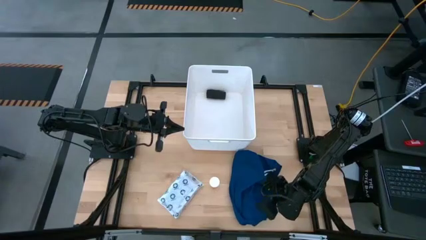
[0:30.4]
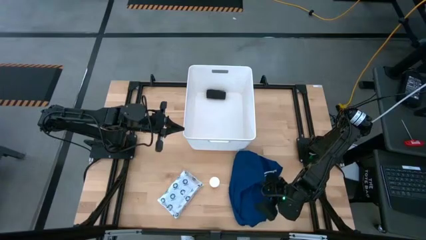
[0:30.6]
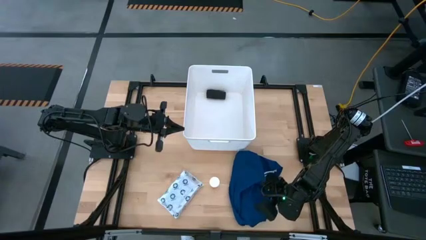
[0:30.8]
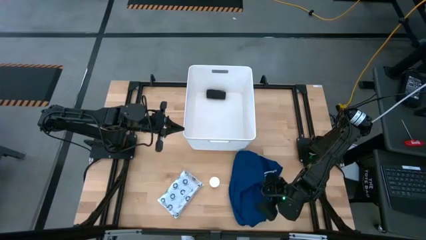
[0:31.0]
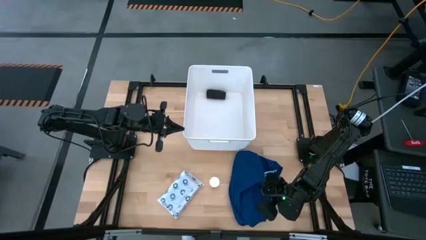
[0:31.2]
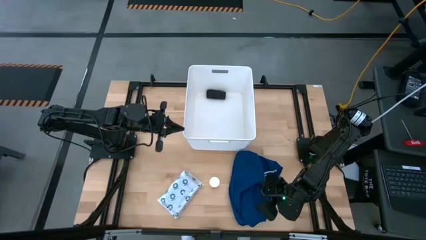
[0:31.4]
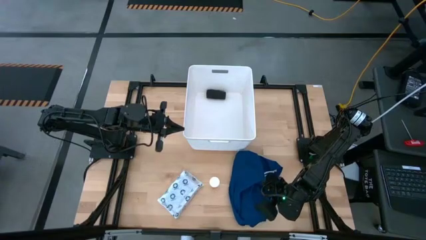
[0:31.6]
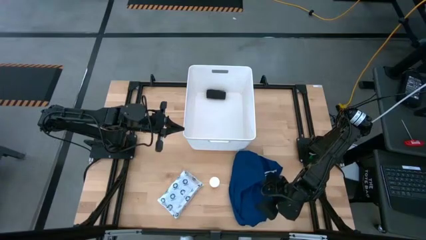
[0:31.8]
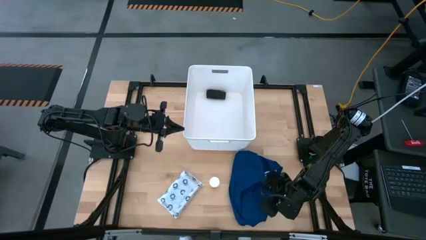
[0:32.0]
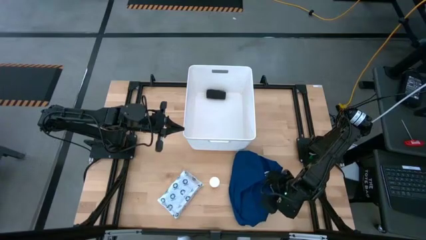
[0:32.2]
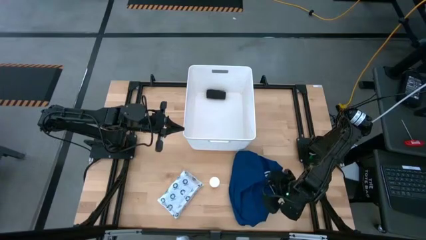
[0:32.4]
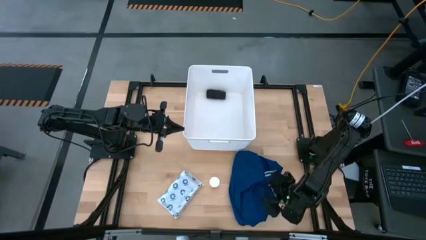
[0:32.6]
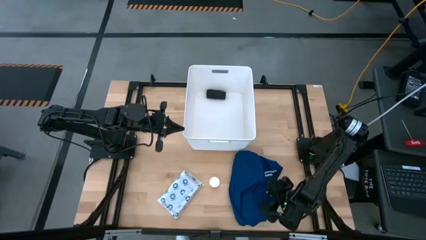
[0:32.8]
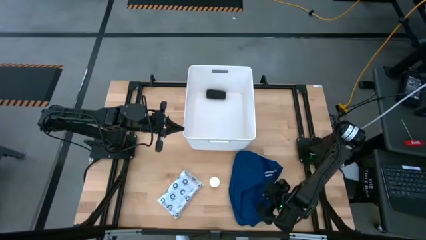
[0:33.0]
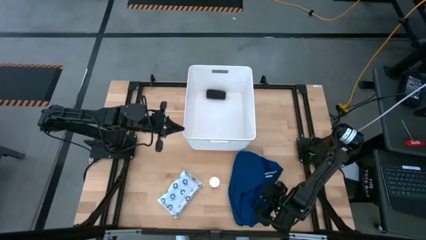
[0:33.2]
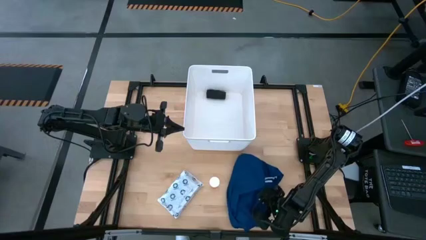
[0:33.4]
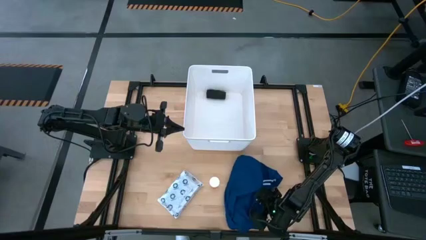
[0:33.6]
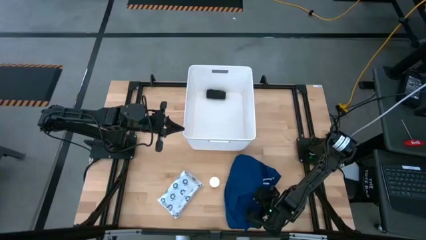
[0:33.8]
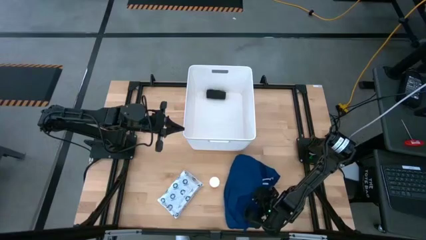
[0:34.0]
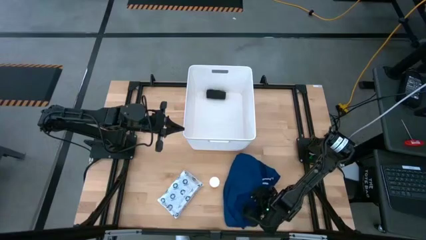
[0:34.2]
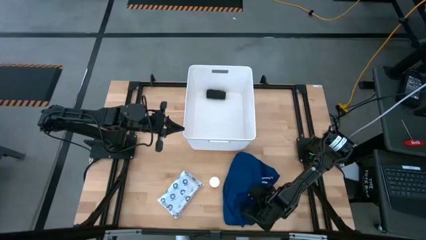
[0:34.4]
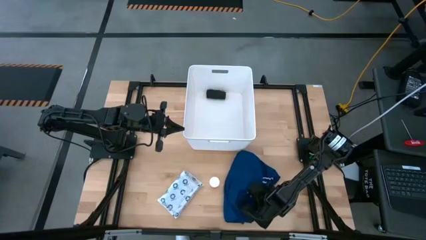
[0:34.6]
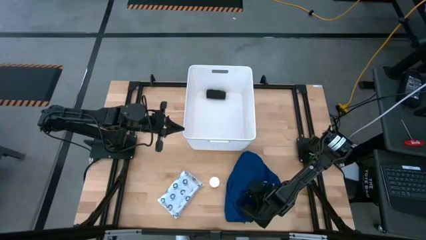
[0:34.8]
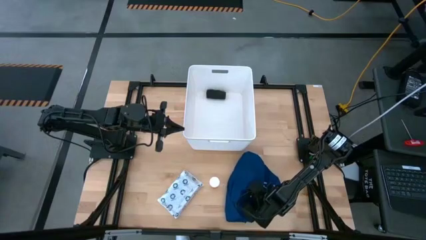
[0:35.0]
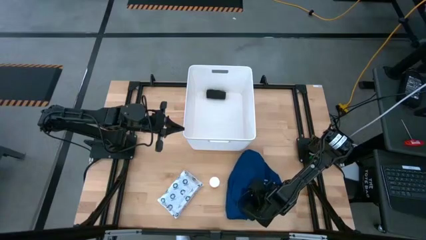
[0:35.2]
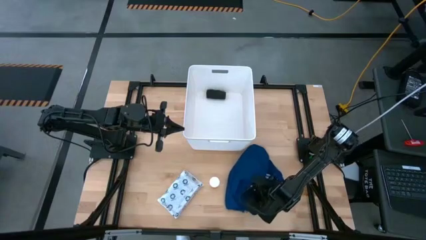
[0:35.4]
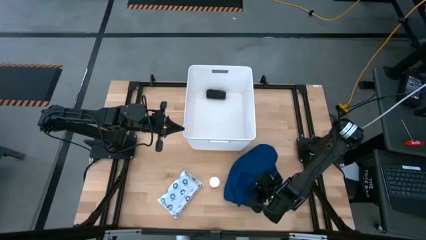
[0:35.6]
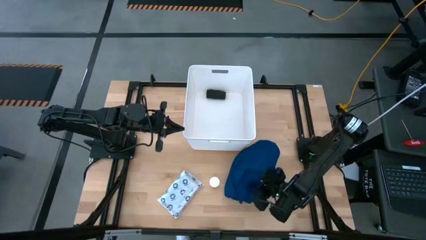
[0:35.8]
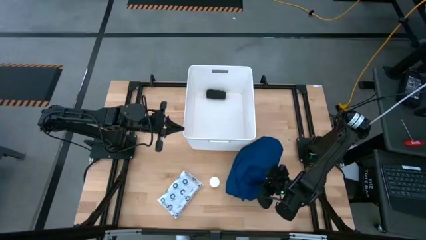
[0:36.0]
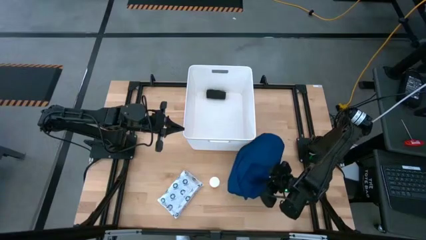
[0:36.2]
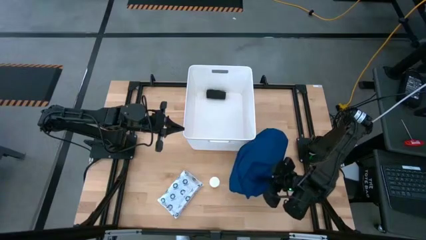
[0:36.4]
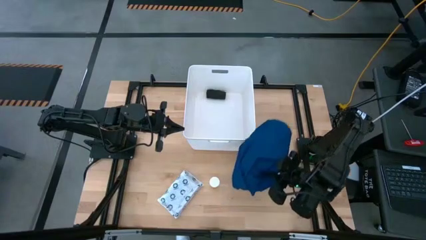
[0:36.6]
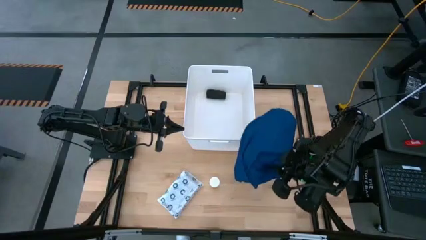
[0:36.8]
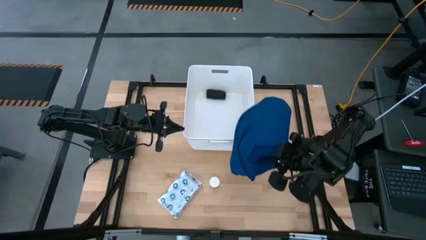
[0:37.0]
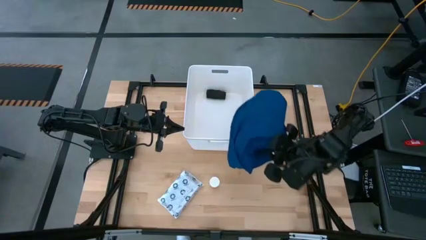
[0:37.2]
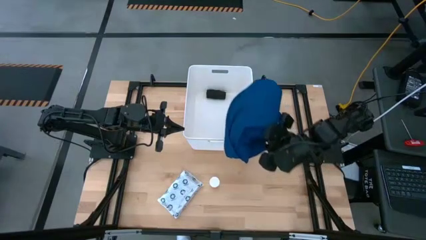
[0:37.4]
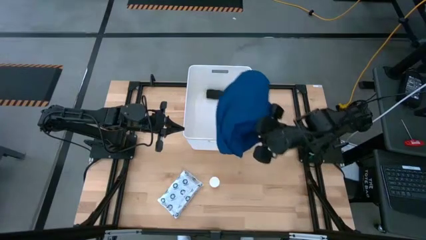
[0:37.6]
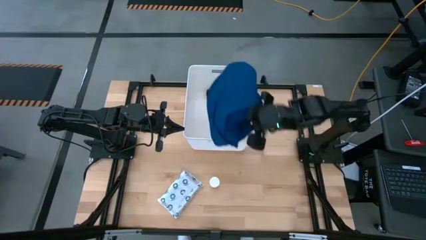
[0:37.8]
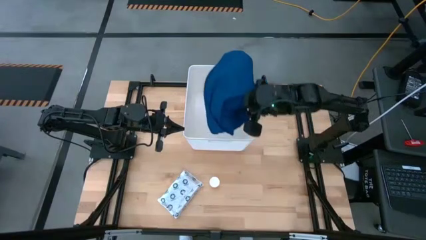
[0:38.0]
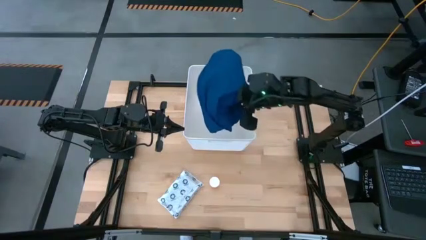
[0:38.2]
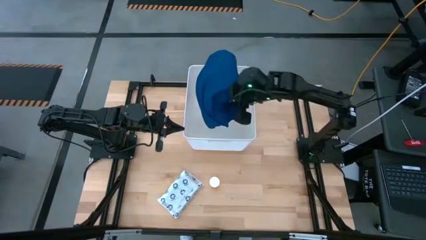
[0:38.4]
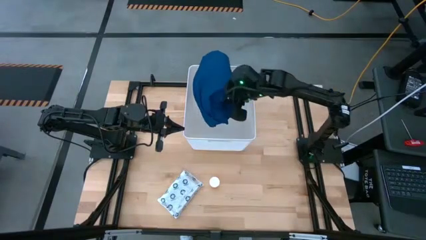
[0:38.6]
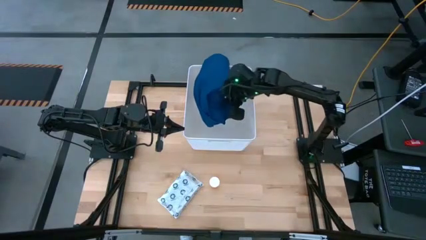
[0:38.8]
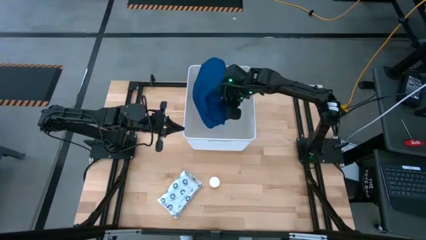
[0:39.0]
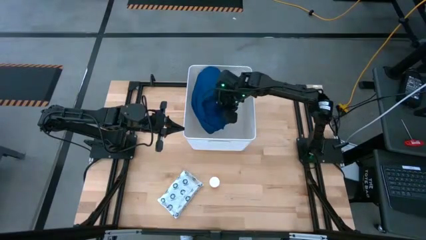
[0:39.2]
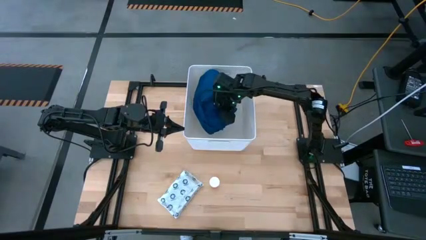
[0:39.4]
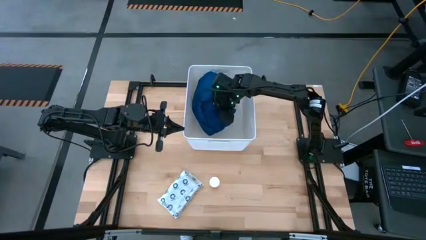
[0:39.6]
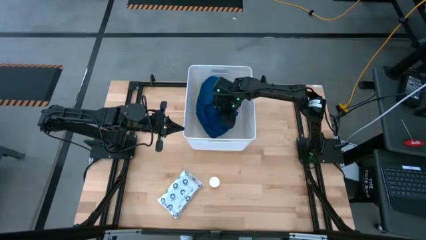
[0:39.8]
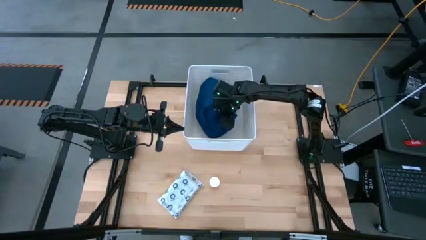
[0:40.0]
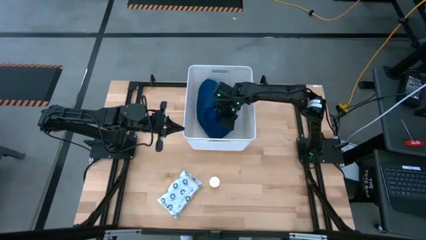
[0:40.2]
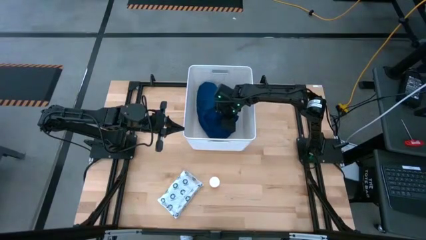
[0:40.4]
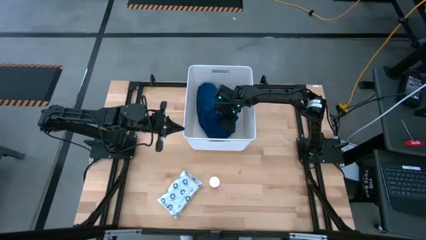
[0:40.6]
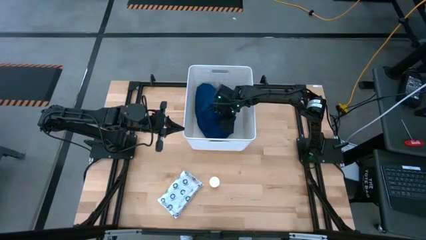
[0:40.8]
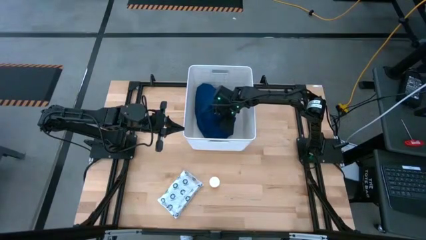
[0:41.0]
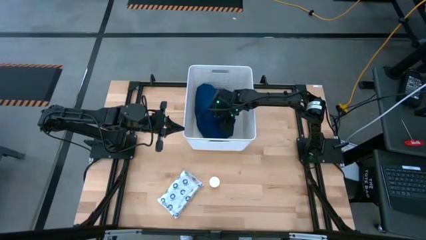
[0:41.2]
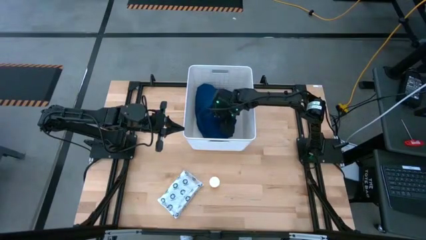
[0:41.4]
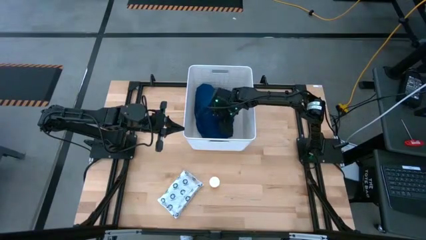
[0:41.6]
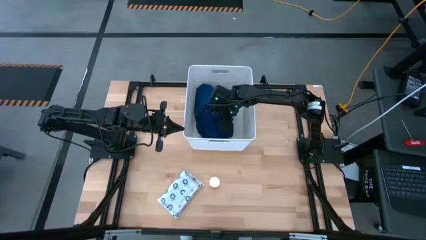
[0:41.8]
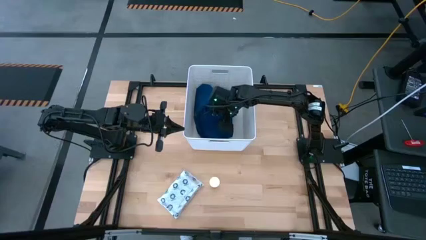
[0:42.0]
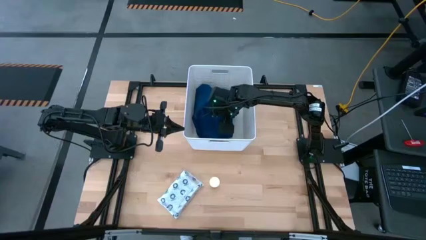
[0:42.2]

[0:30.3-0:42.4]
Task: Pick & place medical supplies in basket/bin
Put the blue patient gown into the white bin

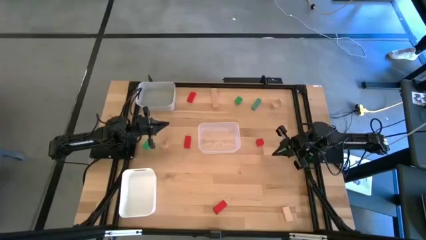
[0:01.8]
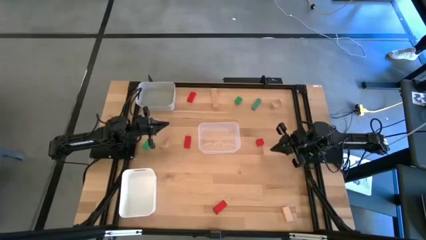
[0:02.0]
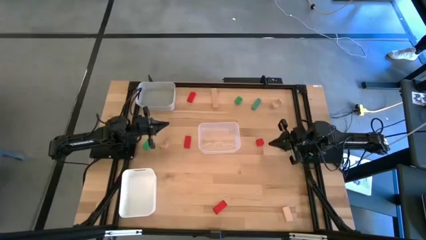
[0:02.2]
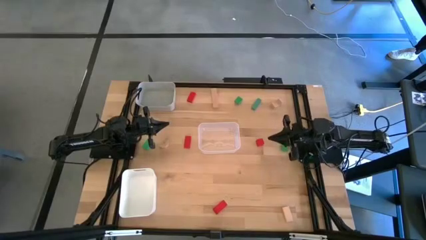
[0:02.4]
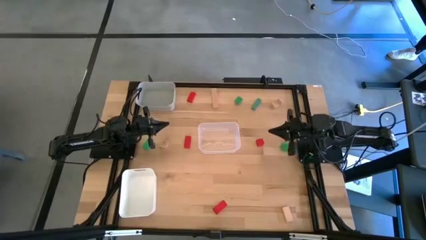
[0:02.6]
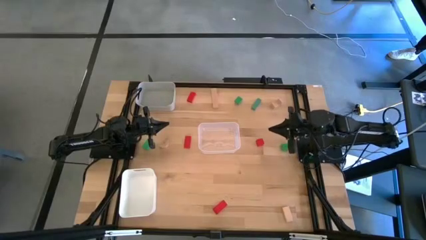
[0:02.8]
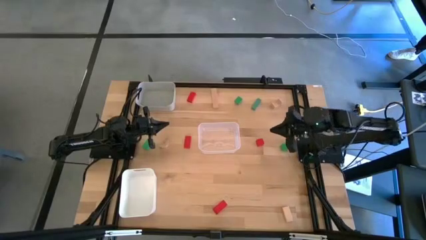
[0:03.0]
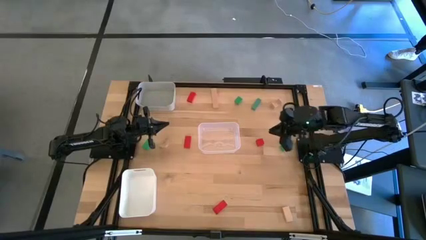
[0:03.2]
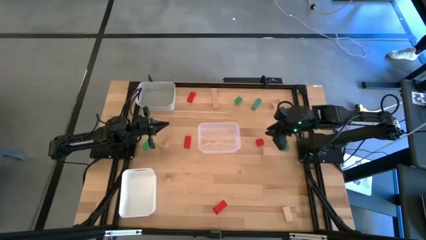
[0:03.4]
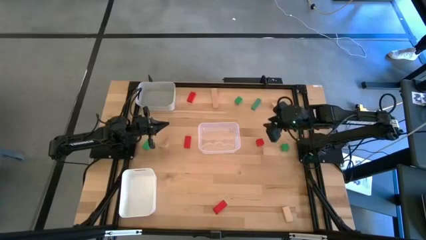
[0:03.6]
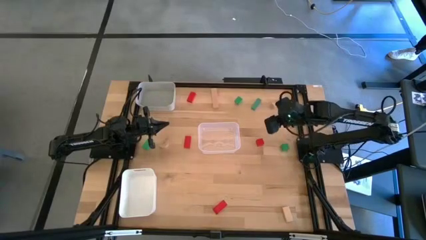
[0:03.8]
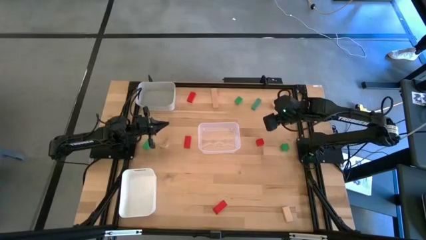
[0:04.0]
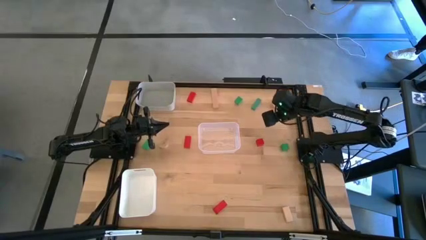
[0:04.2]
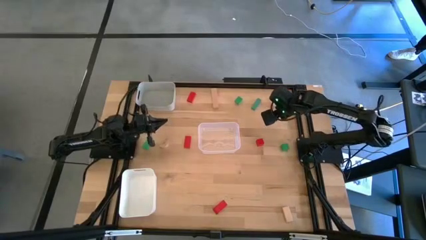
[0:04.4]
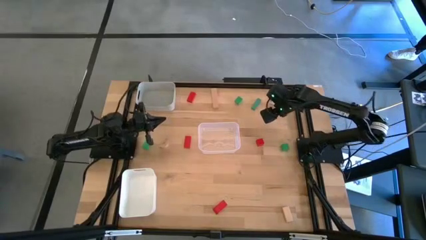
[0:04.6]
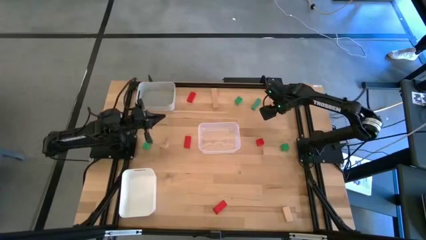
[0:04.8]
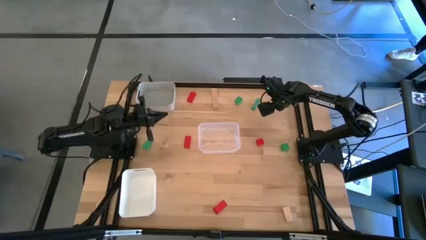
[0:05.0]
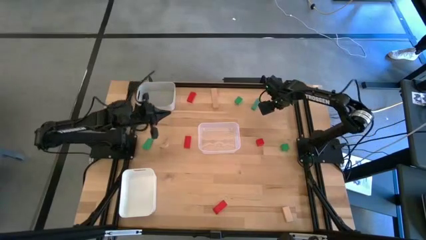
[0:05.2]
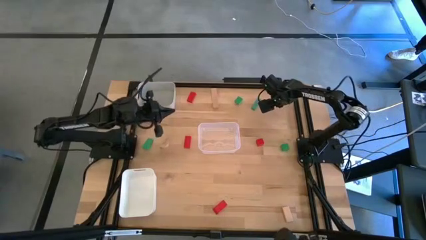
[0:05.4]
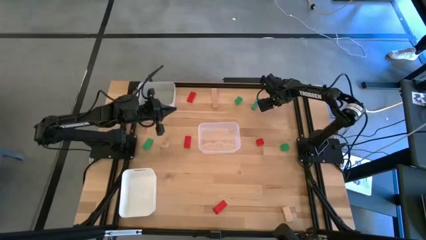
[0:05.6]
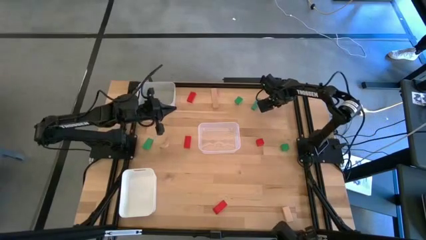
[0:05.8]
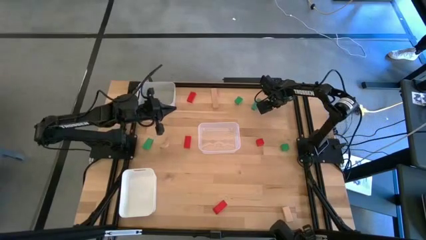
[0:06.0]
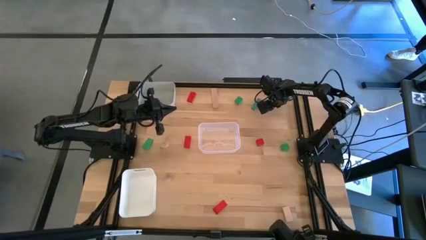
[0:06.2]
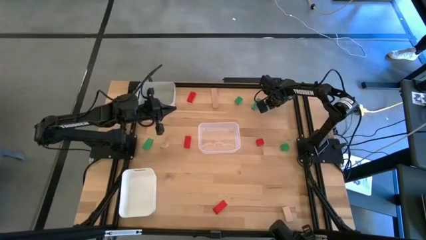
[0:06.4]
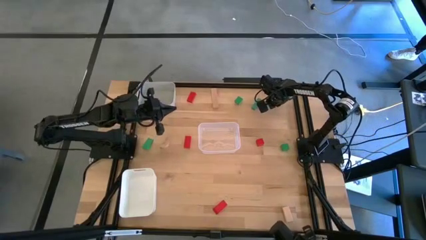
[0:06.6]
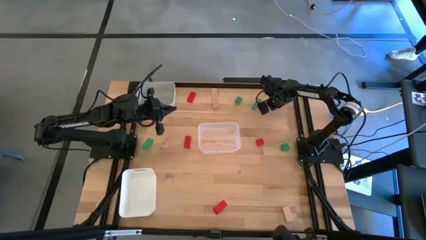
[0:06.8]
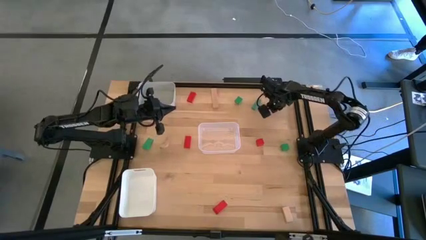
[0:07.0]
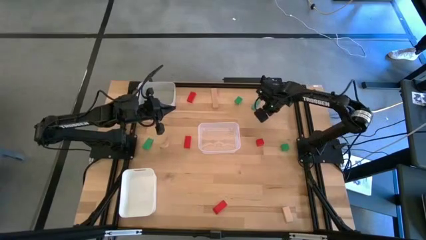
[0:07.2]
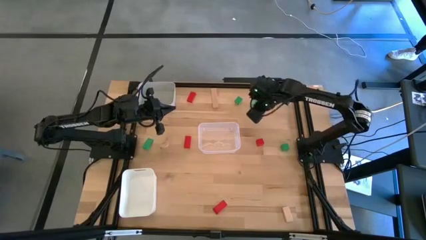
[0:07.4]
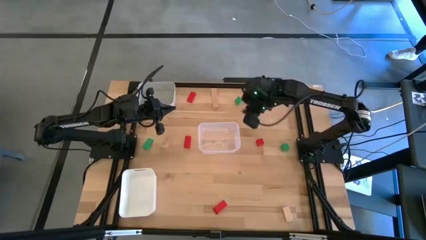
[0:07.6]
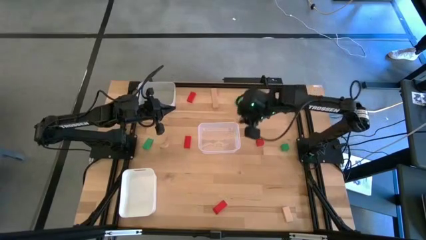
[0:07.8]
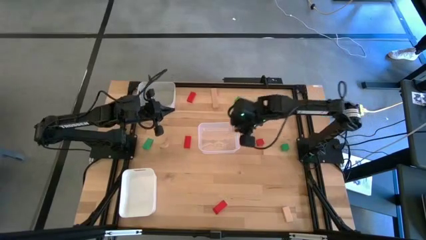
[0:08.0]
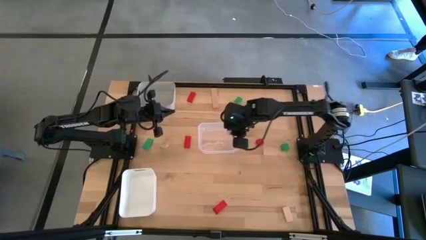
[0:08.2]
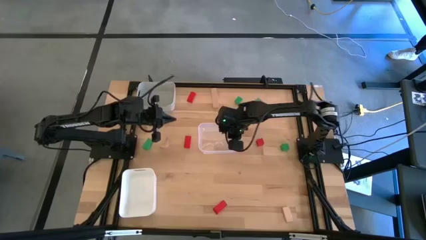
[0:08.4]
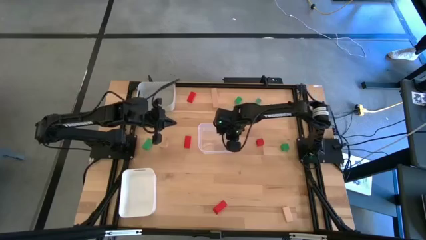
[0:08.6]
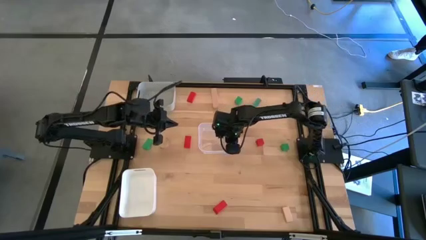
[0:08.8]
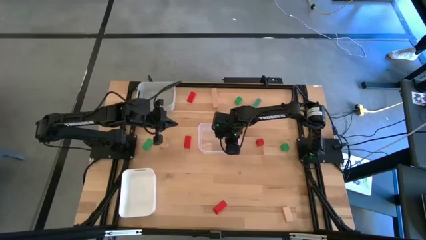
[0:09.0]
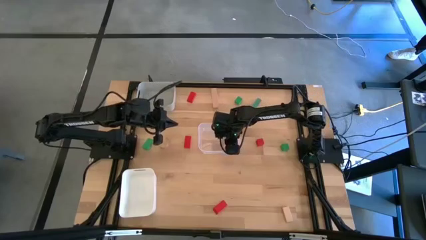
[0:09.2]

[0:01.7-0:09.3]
Task: Sort & place blocks by color
Put the brown block into the transparent bin
